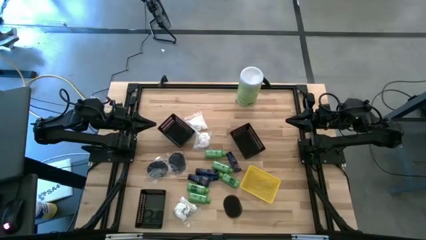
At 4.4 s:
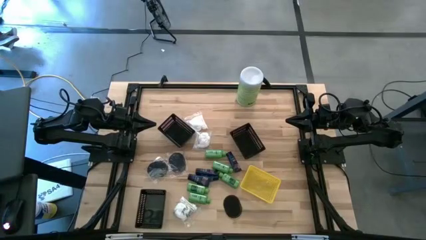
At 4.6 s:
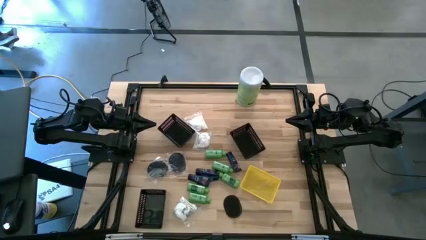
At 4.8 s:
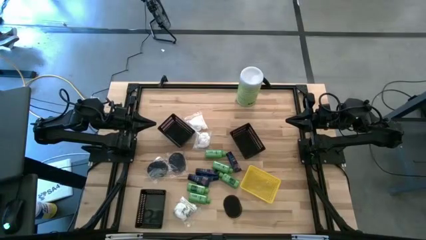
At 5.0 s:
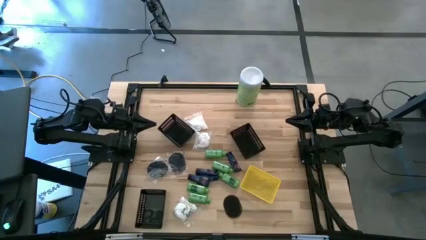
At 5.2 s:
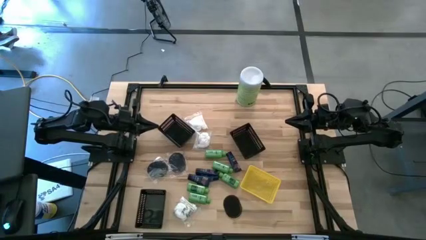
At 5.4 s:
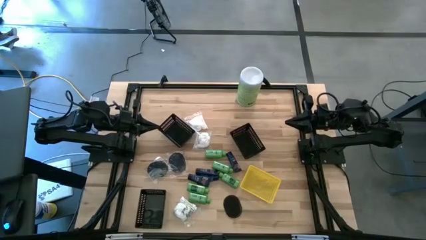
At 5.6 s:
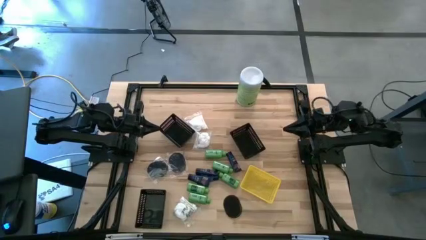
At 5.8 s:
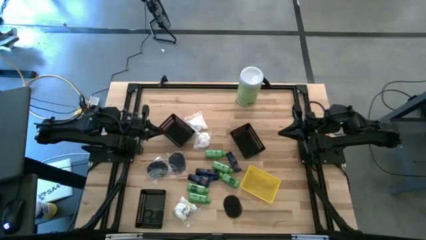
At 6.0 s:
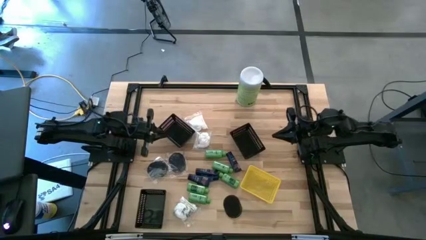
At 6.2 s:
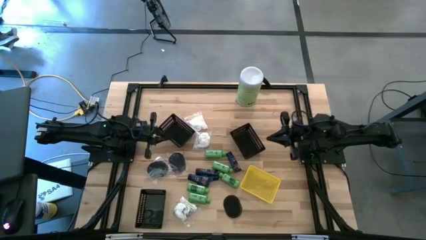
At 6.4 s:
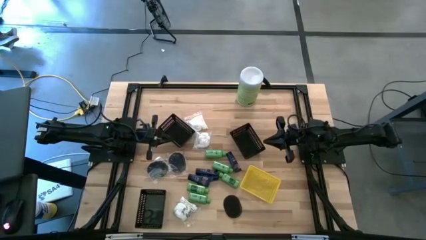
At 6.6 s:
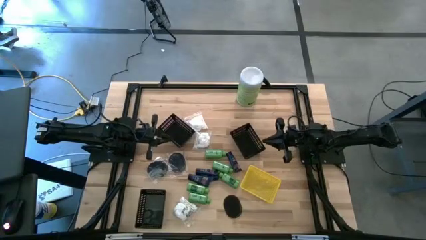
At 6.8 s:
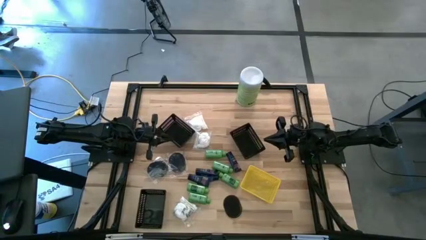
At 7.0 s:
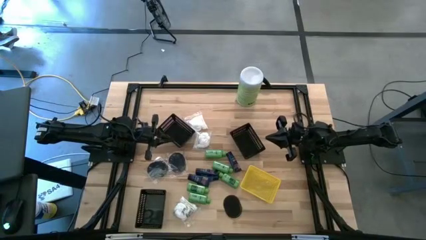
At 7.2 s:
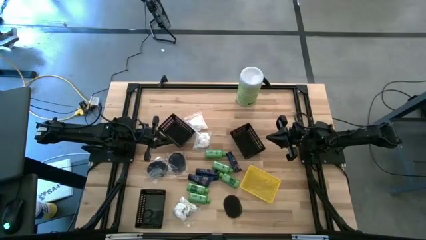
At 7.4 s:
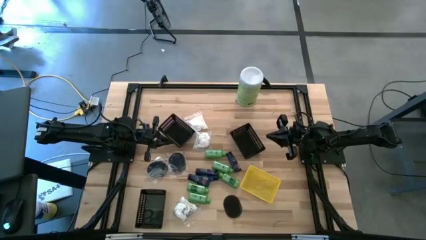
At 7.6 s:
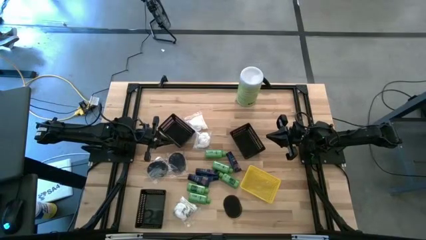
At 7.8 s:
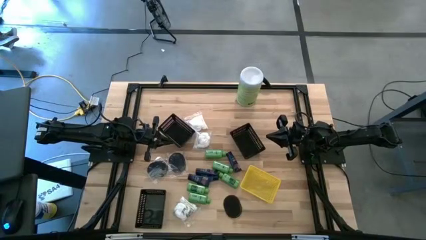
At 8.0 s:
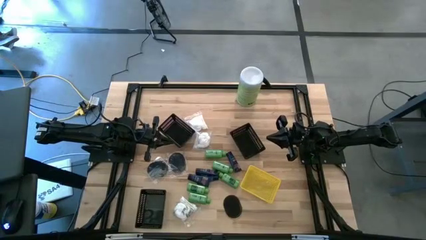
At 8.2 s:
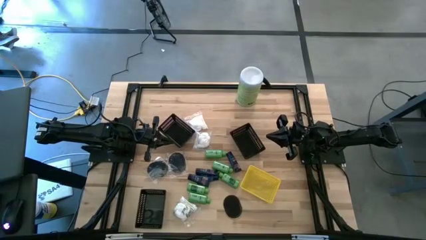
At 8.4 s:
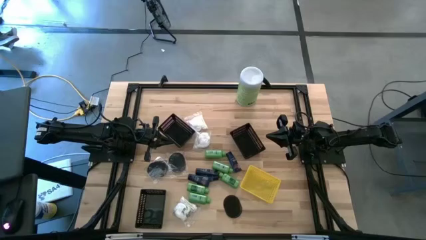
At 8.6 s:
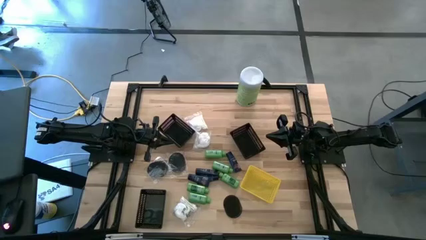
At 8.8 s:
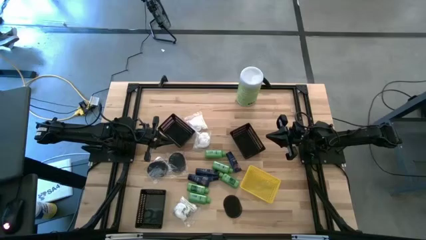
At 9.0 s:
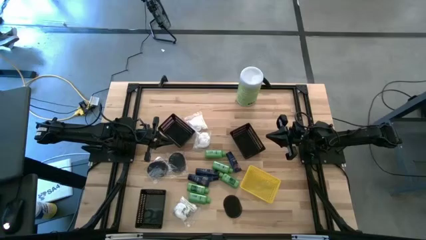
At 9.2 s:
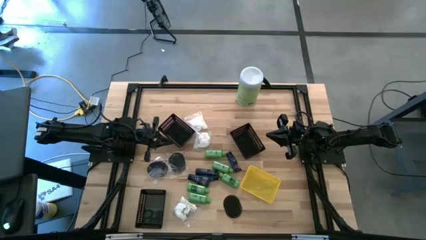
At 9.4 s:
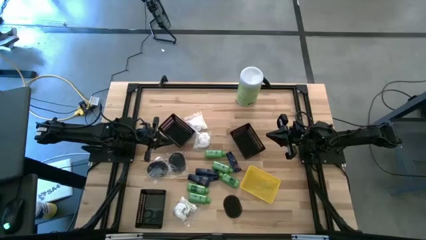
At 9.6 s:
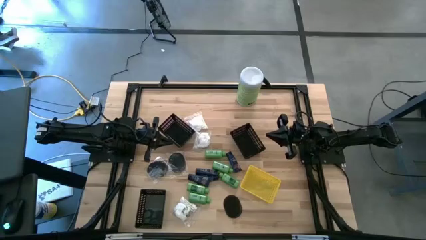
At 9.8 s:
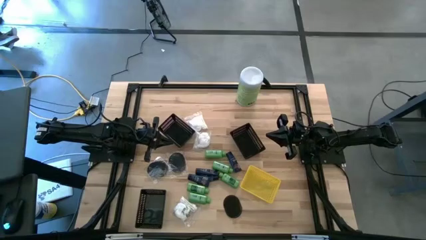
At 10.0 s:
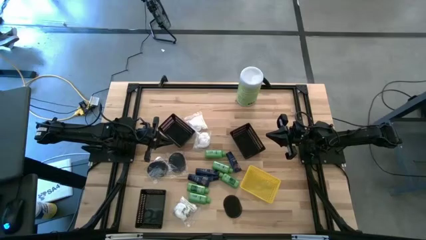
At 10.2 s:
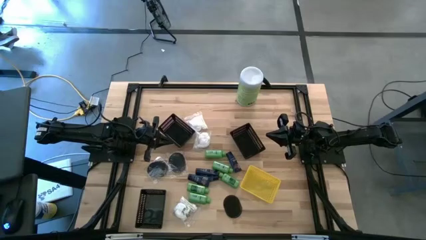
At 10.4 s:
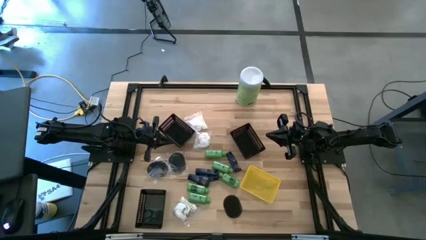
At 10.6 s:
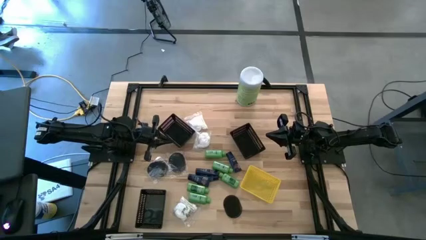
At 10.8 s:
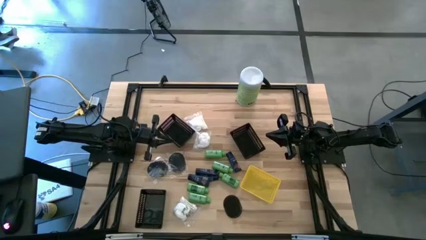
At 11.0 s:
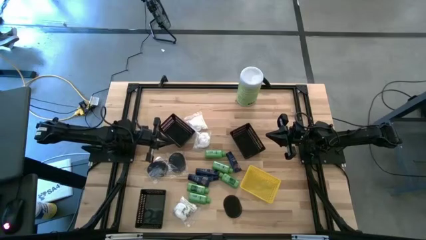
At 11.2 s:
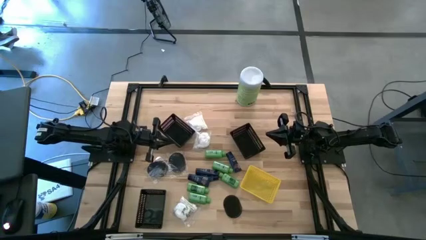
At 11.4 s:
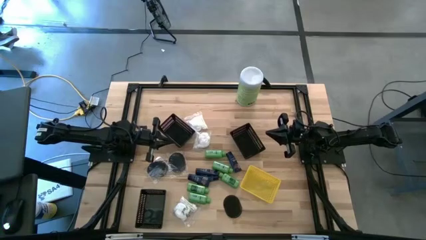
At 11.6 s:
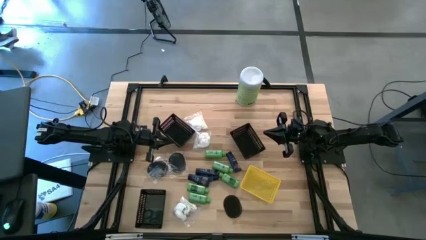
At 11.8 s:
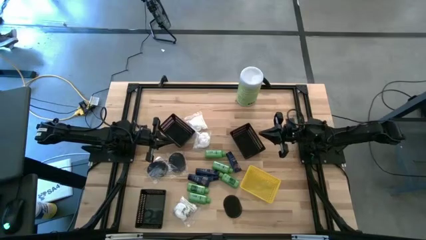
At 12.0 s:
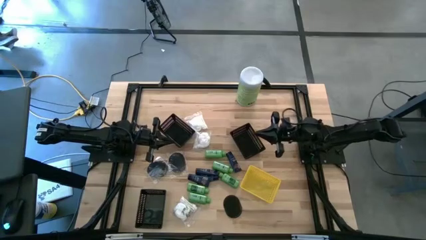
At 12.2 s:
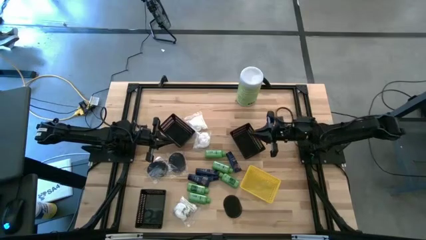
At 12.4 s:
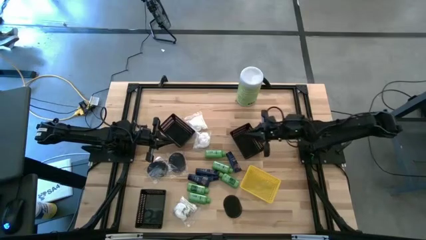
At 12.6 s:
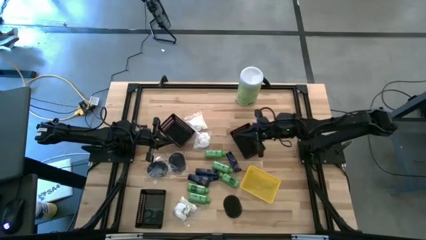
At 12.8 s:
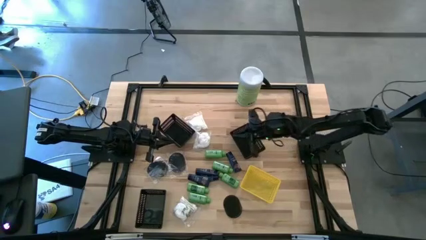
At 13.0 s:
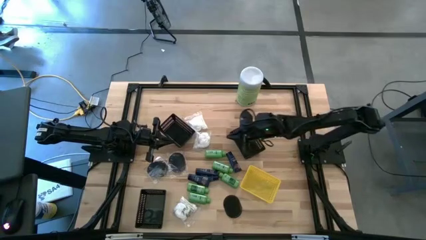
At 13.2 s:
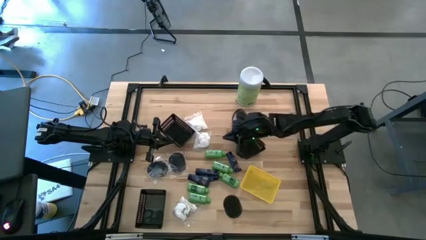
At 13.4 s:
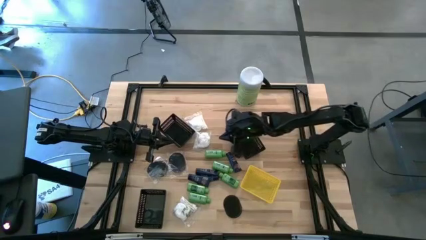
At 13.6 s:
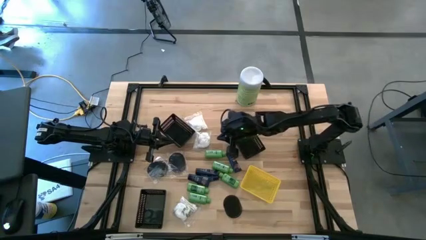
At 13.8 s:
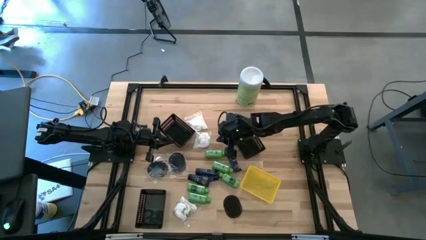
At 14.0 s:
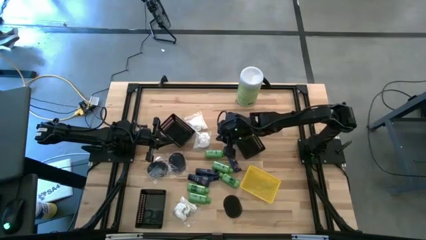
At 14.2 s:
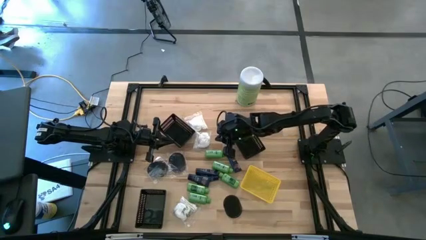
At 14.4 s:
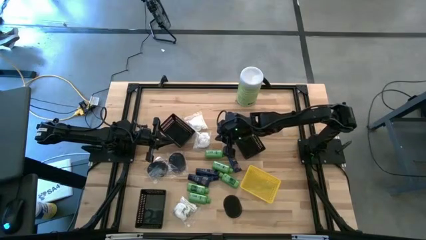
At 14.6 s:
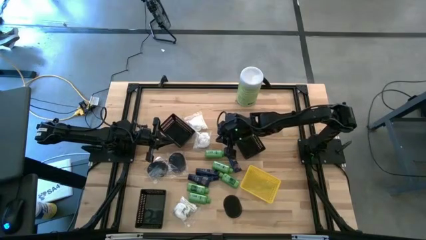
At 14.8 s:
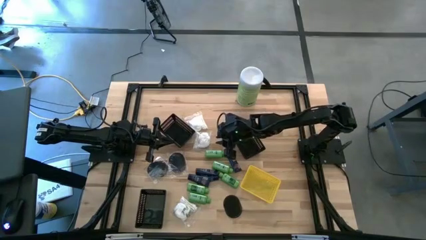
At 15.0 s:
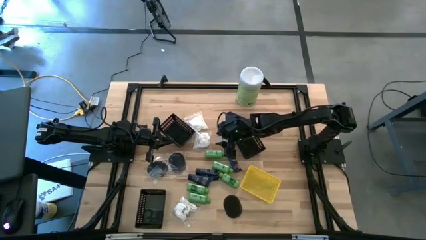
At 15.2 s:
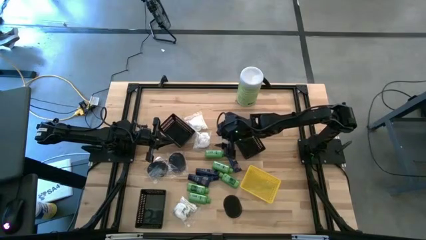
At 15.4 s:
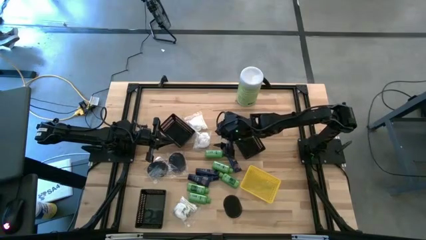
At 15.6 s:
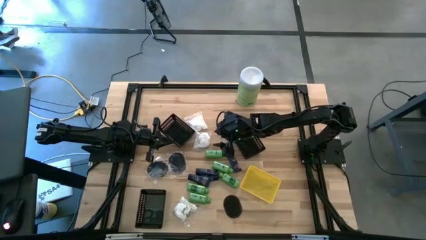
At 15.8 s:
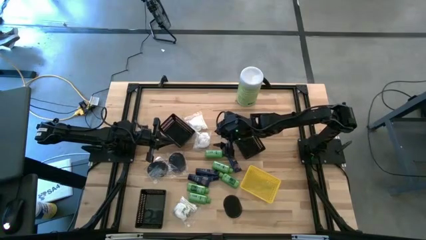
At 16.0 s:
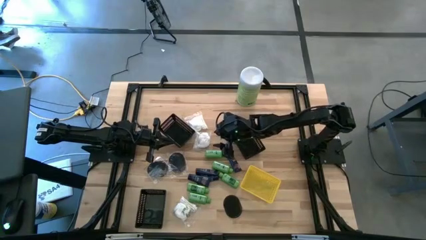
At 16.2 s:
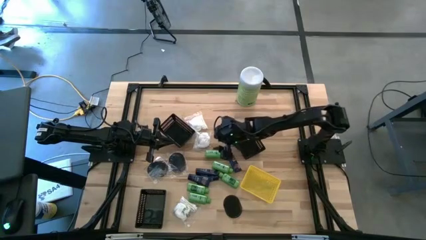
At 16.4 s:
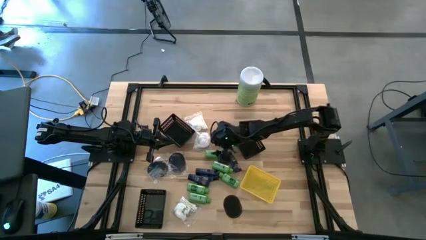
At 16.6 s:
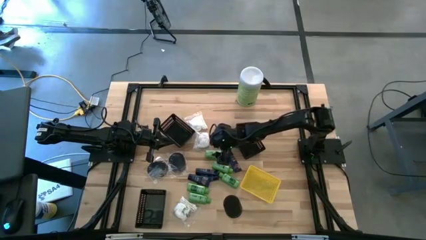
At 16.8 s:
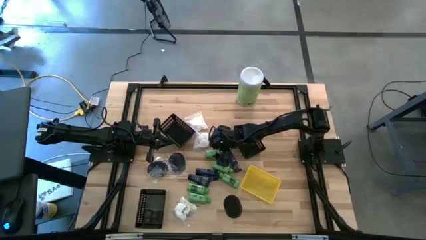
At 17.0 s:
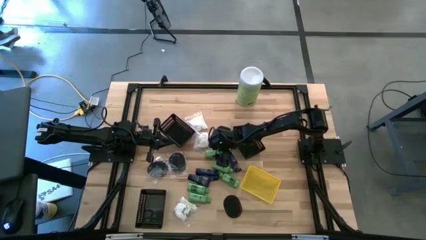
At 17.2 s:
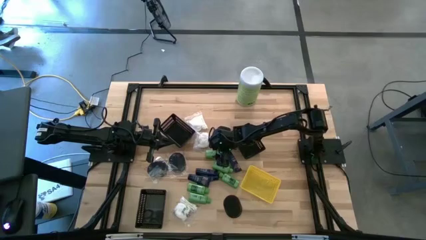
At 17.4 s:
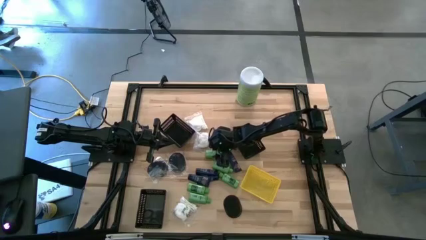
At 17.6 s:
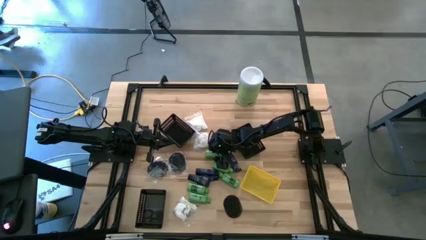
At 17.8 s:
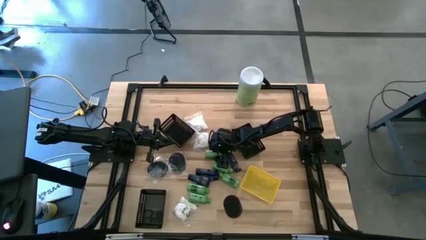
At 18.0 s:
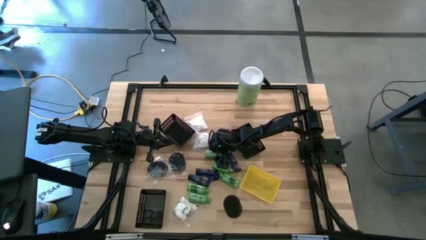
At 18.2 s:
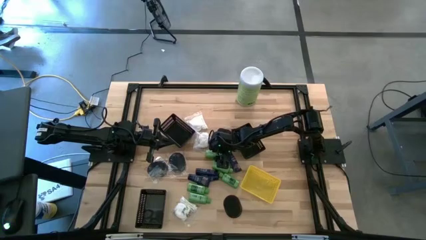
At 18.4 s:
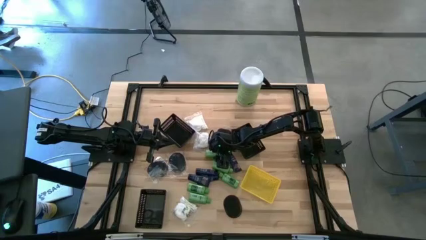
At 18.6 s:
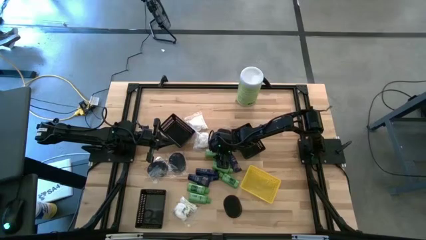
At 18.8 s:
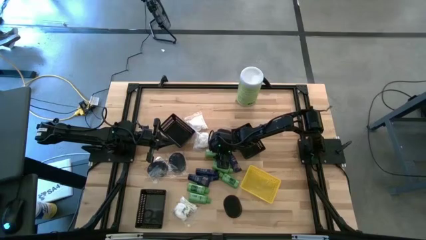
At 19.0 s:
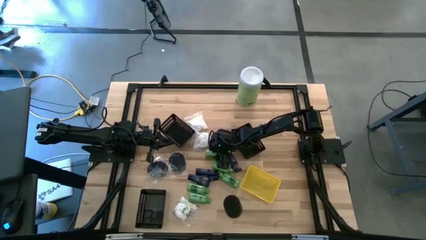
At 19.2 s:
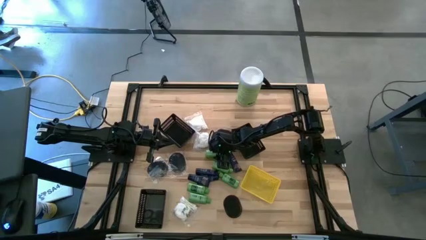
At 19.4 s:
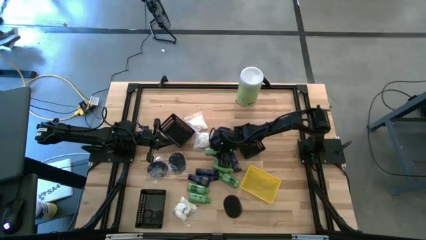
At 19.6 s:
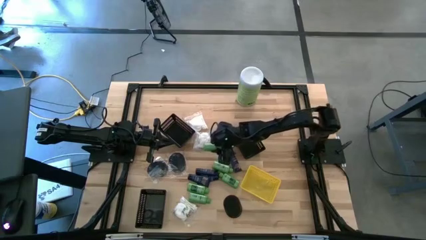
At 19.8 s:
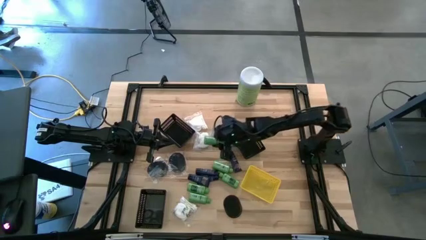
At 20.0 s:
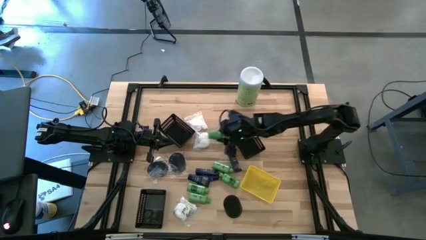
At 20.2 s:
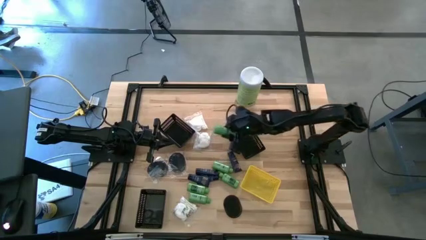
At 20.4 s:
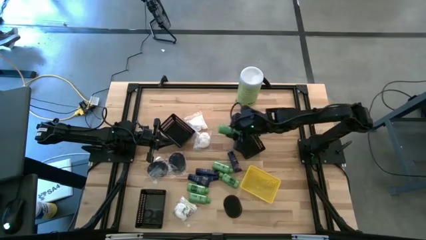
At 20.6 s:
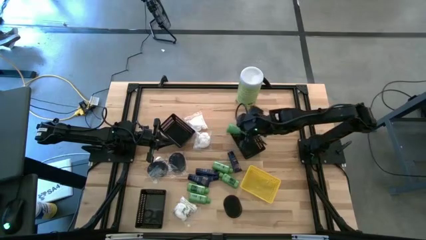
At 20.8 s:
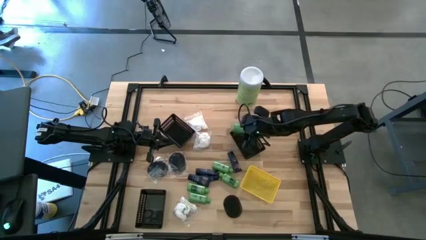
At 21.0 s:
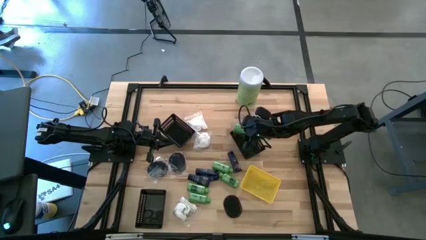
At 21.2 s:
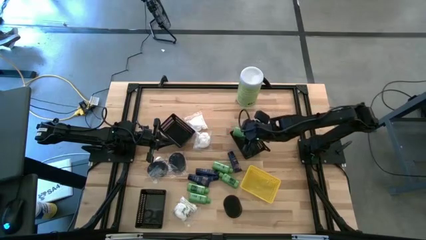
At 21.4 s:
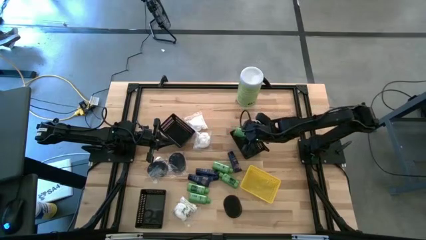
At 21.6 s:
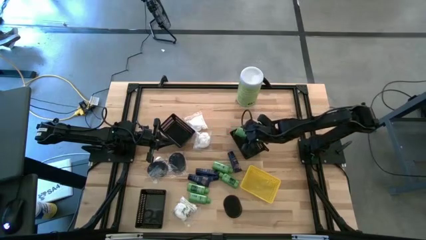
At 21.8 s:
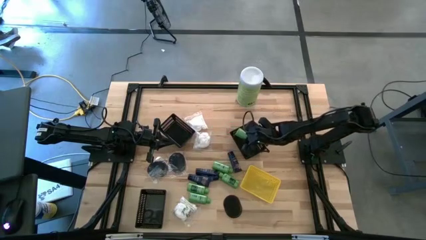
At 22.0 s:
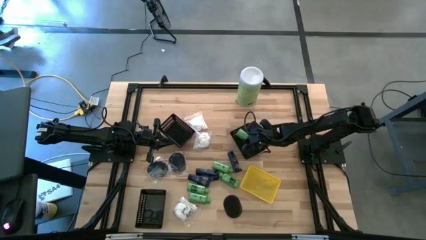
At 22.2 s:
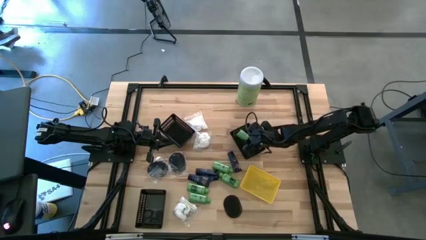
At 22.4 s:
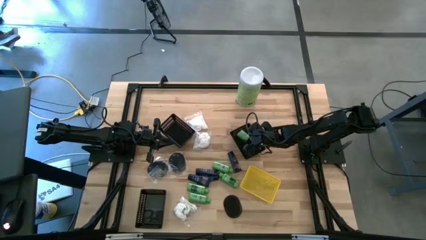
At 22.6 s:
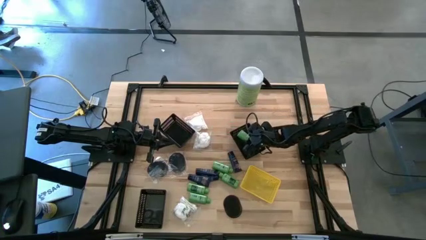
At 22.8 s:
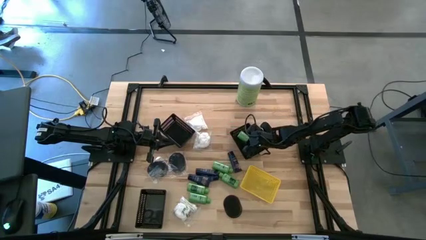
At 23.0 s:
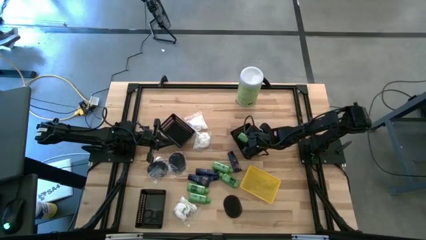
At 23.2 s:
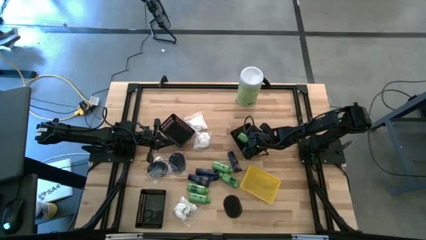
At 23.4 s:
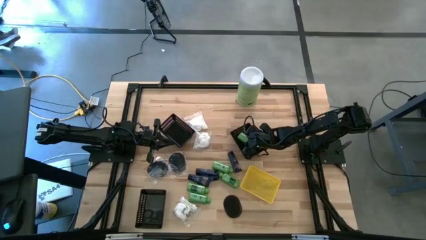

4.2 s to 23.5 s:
Task: Pick & Place Travel size toiletries
Put the shampoo bottle into the top right black bin
